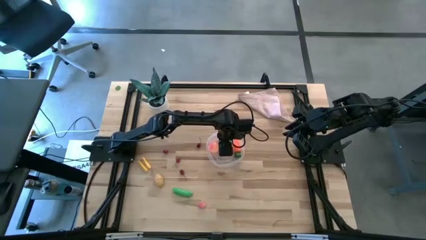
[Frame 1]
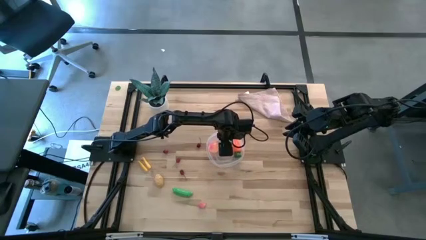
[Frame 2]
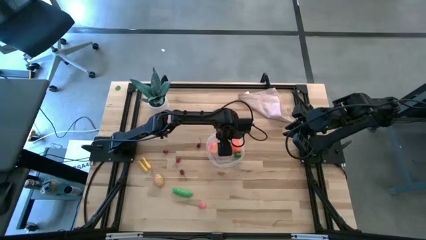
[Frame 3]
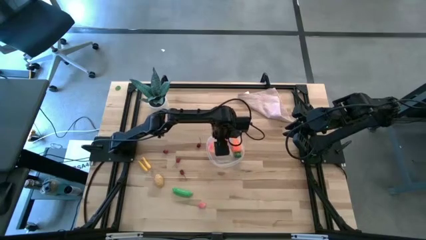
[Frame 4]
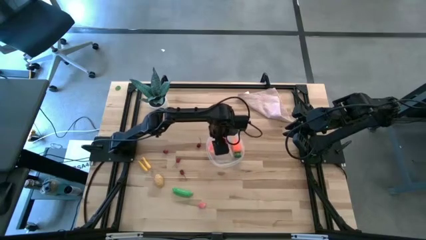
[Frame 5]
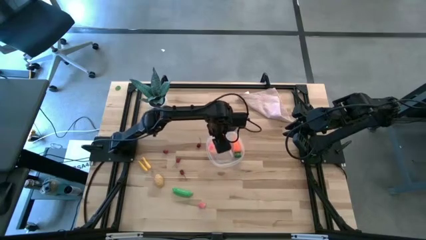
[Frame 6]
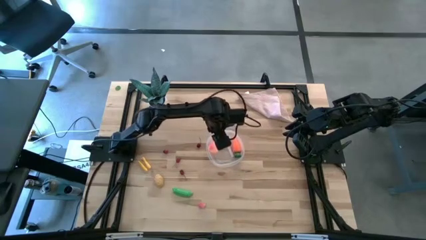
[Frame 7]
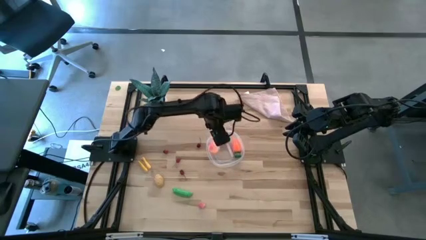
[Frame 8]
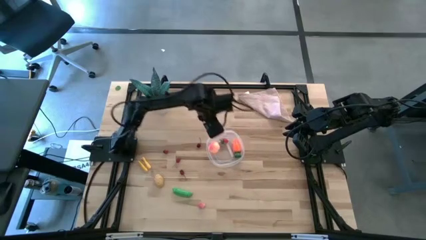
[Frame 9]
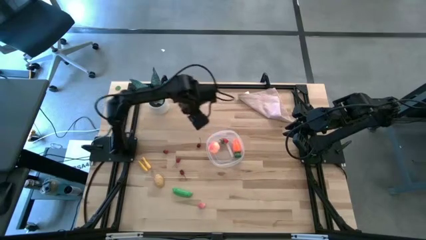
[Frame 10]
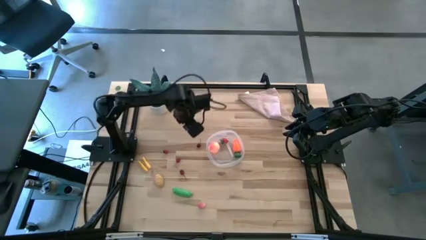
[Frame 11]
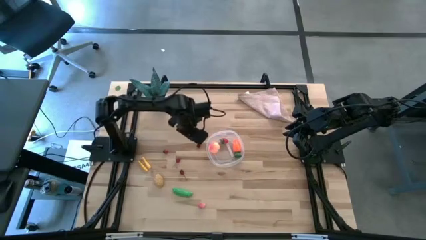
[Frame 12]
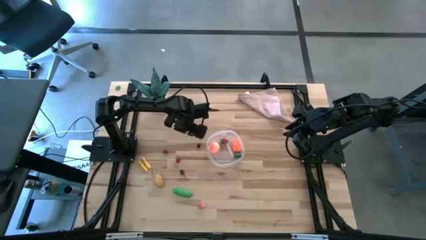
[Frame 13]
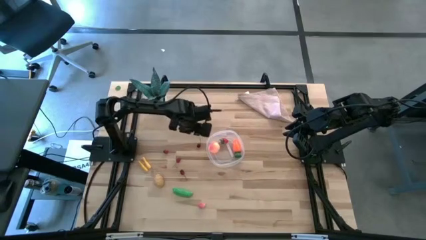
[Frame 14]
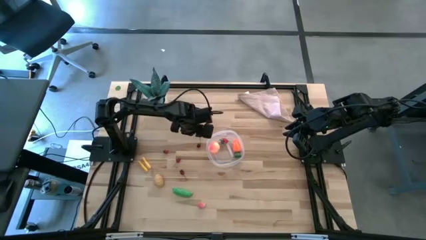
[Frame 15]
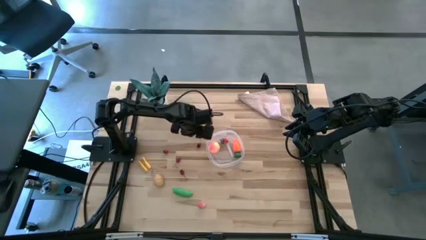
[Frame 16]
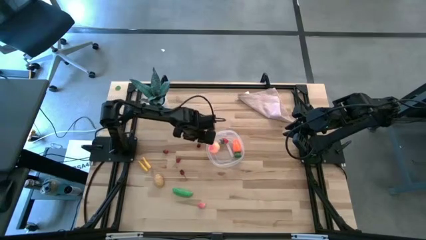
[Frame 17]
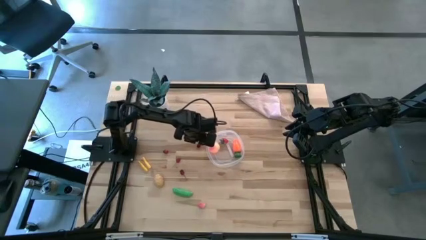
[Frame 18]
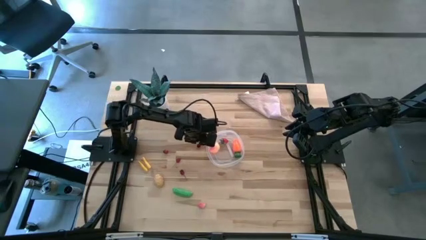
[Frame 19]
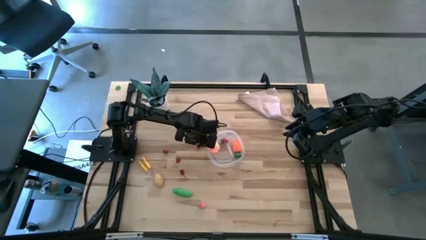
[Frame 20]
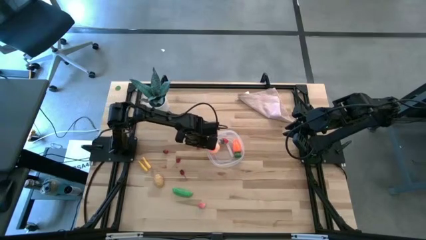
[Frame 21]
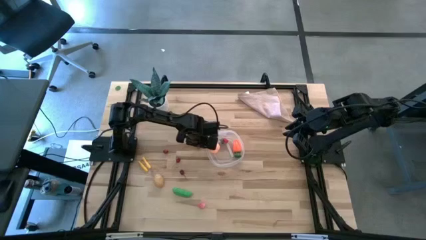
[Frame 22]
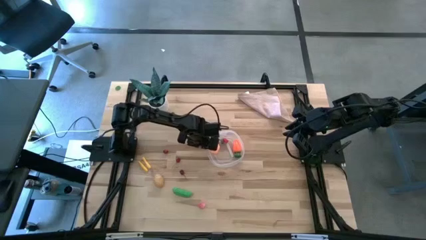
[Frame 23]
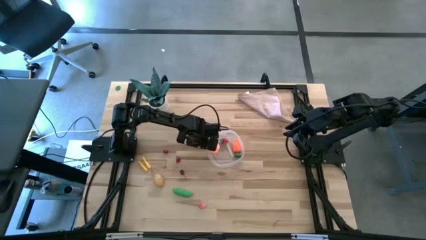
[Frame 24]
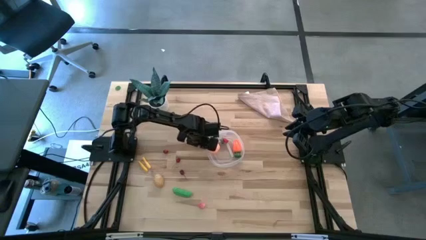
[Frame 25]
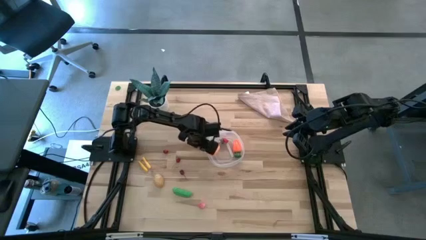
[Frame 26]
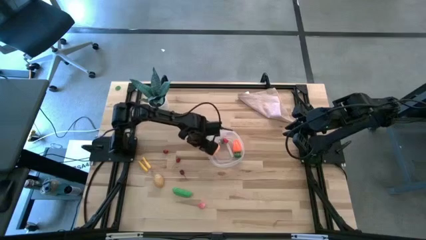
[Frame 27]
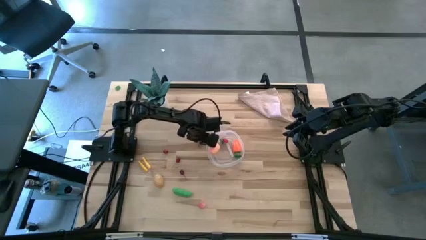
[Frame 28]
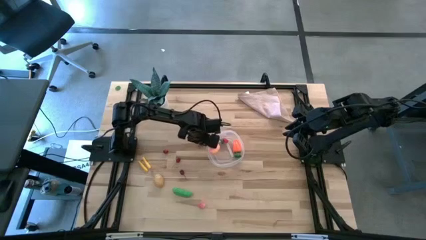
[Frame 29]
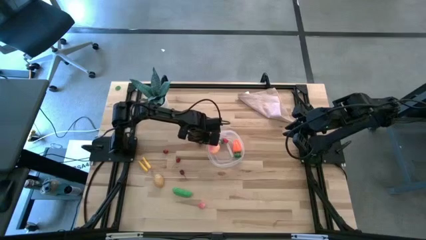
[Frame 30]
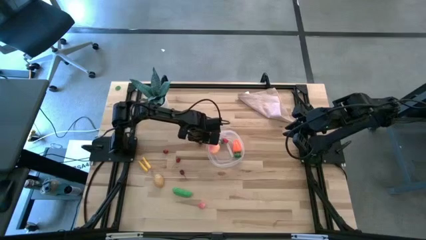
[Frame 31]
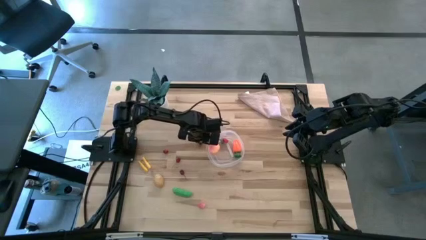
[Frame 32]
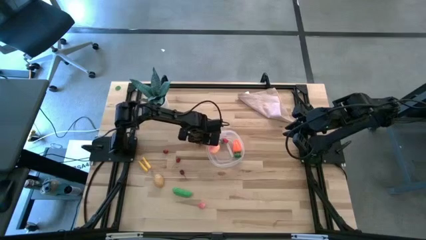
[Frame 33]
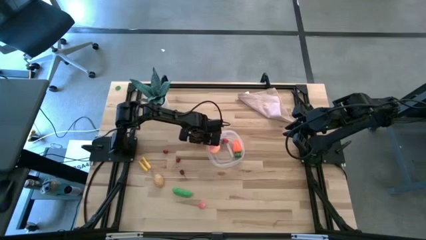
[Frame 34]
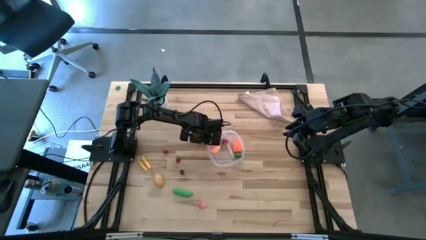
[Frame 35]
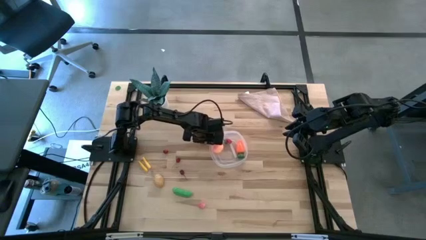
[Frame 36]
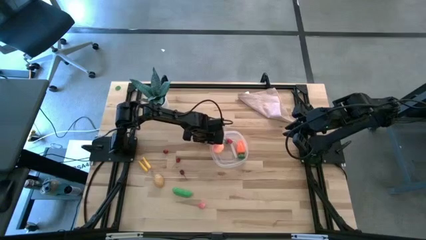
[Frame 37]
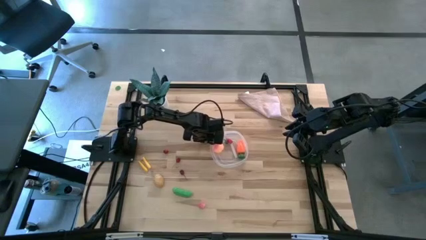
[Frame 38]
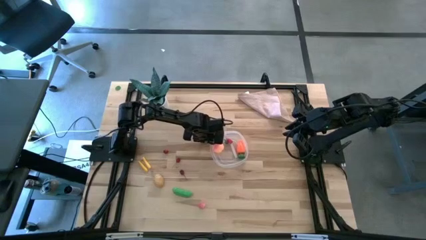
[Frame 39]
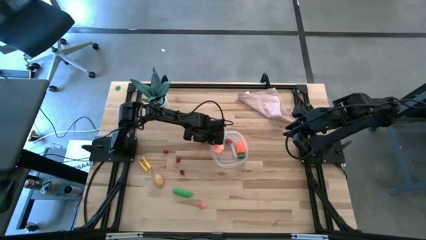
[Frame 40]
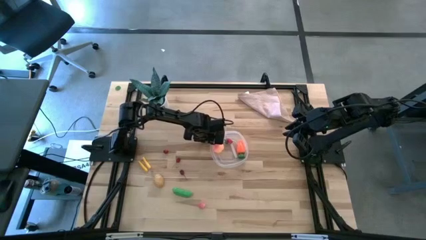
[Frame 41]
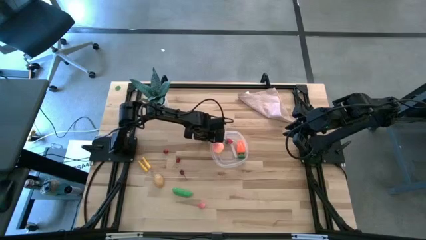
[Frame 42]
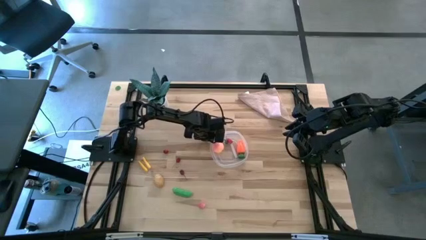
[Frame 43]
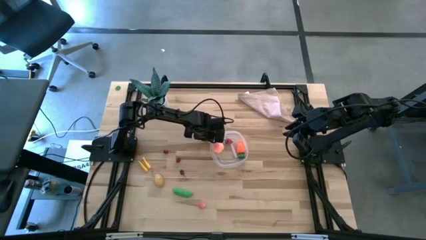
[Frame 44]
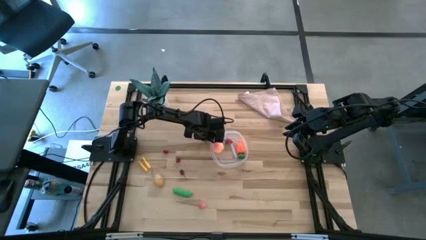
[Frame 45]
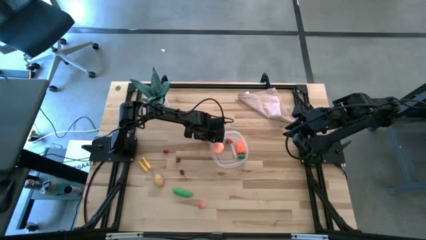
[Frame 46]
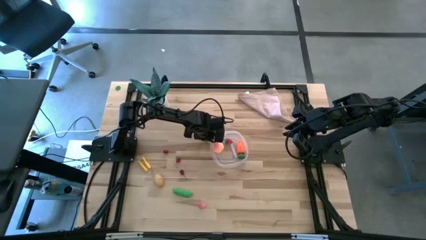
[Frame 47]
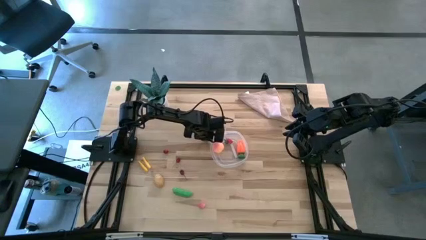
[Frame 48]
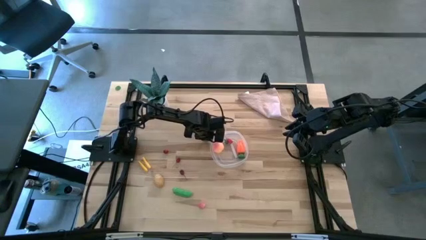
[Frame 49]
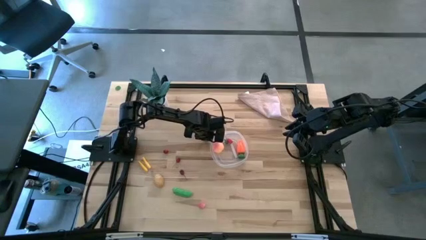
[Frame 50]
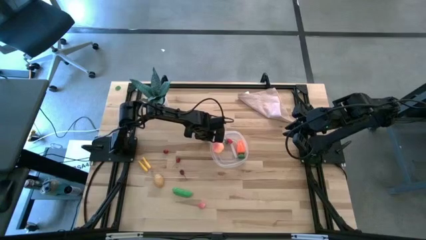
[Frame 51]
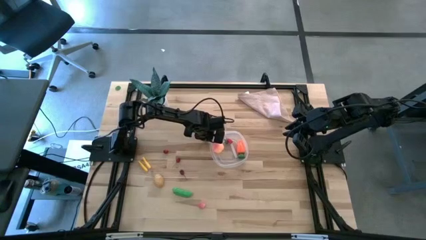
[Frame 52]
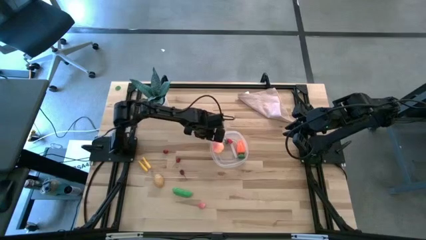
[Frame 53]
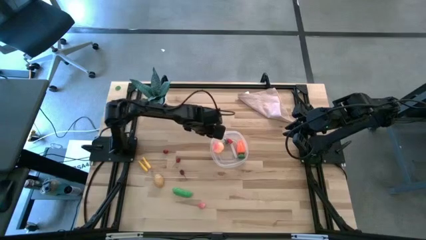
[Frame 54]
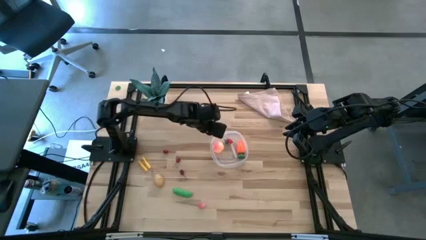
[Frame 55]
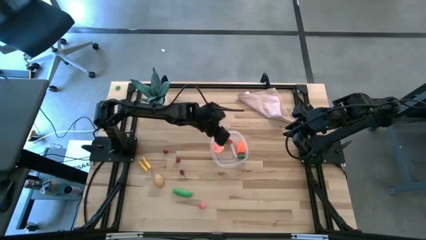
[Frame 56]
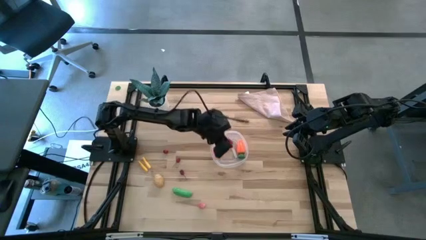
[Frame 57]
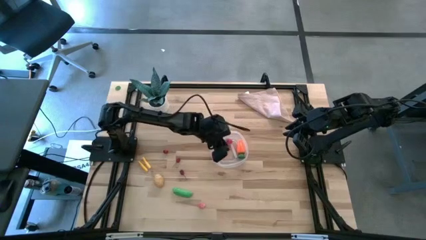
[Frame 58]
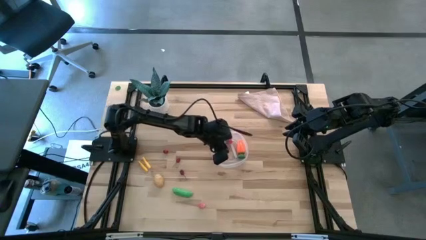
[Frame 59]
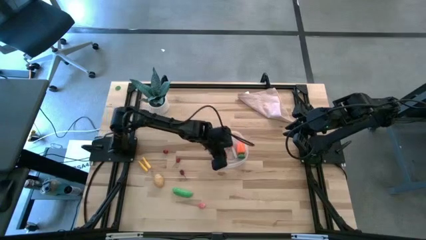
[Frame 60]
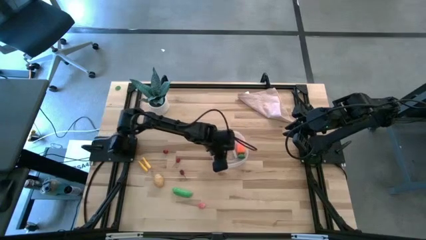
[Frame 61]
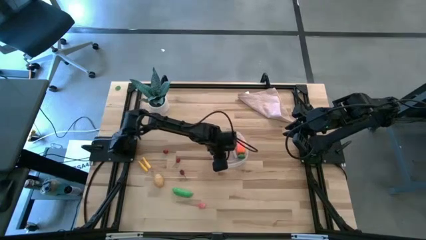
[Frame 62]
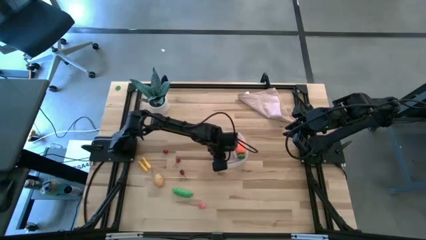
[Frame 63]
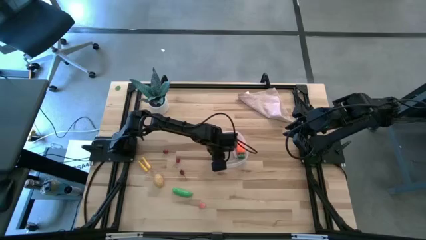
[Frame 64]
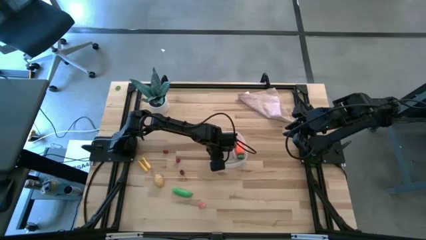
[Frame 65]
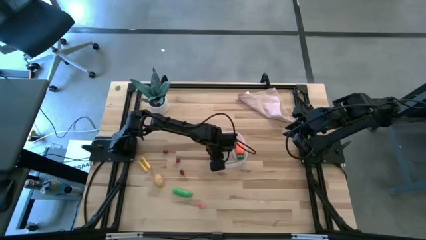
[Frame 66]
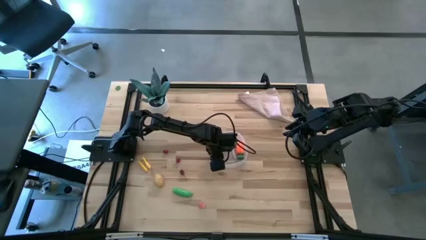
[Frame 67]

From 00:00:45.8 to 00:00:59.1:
Task: Pick and placing Produce into tupperware
Put the red cherry into the transparent bin
